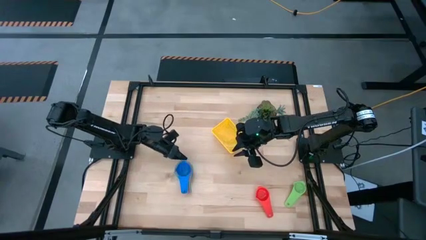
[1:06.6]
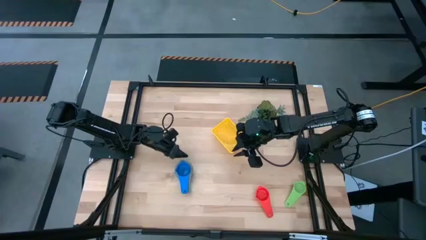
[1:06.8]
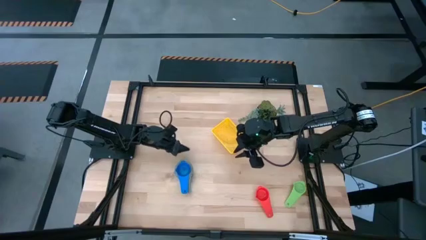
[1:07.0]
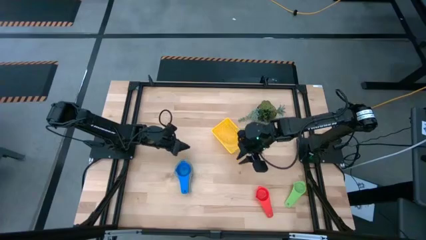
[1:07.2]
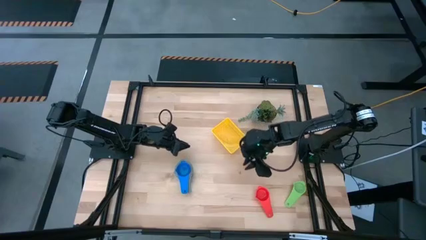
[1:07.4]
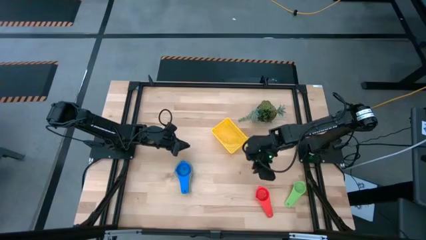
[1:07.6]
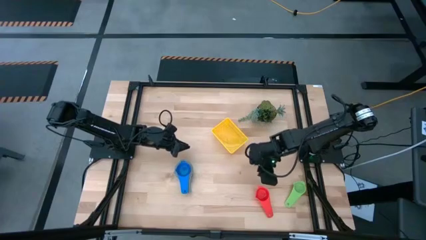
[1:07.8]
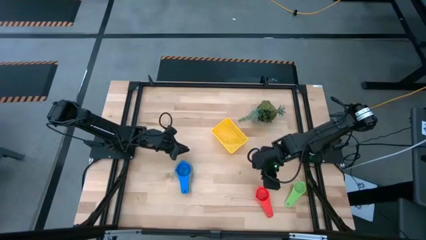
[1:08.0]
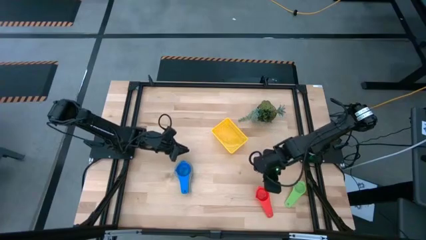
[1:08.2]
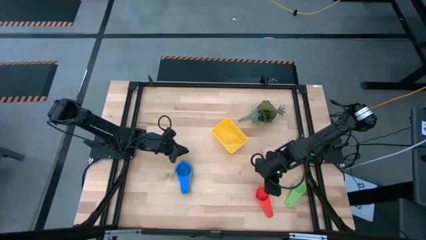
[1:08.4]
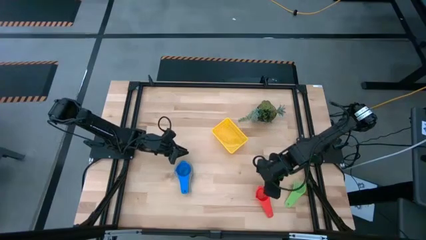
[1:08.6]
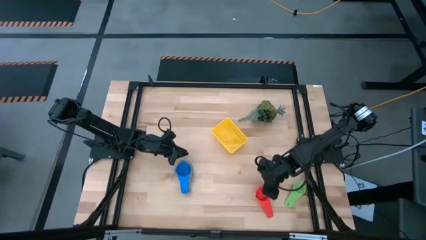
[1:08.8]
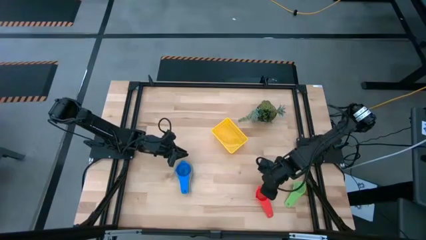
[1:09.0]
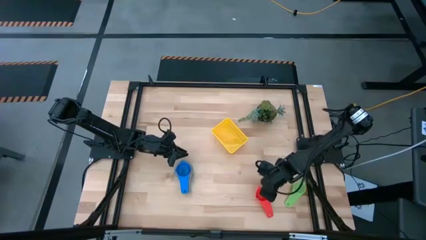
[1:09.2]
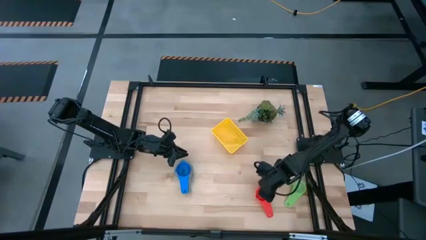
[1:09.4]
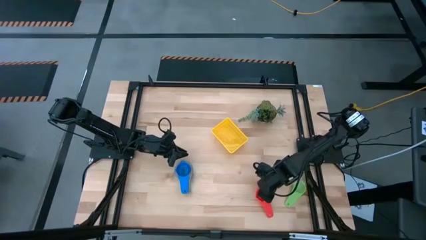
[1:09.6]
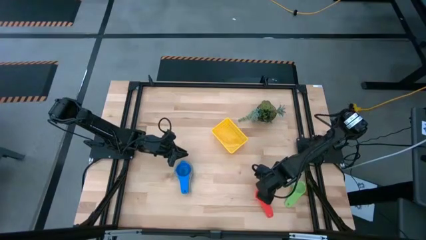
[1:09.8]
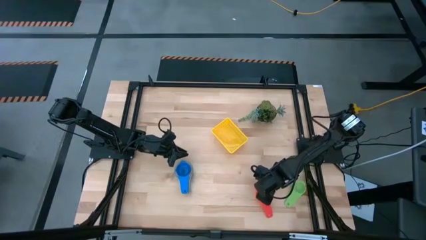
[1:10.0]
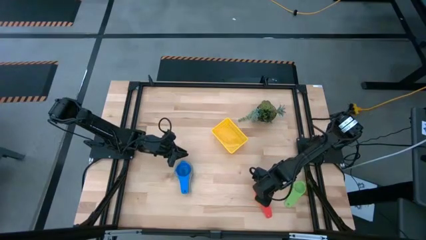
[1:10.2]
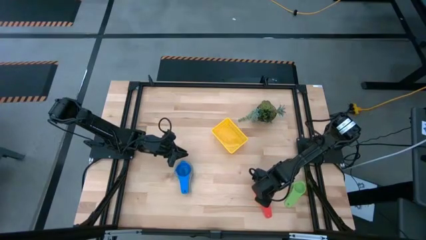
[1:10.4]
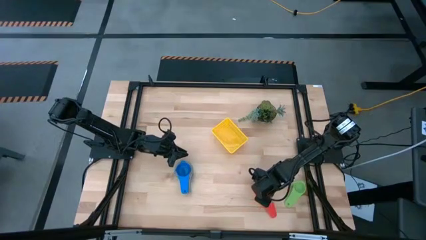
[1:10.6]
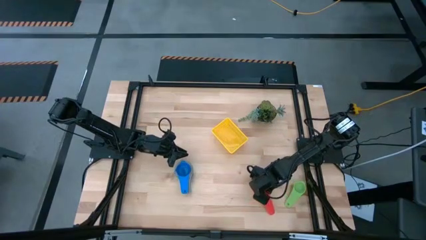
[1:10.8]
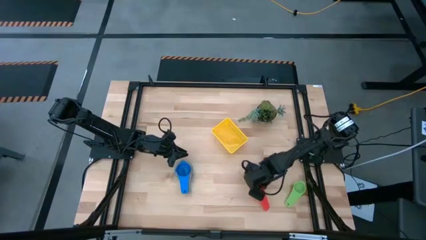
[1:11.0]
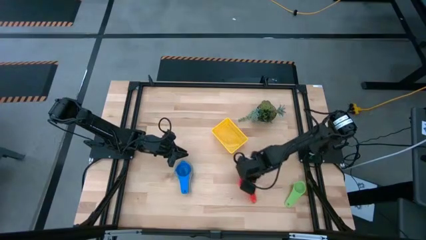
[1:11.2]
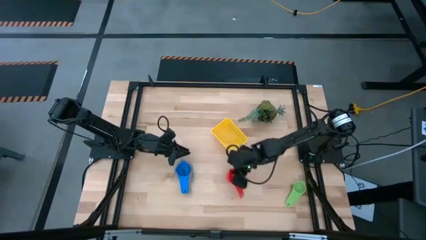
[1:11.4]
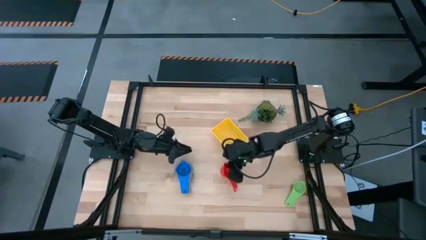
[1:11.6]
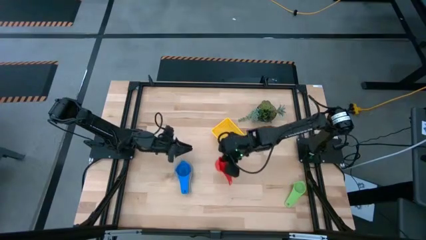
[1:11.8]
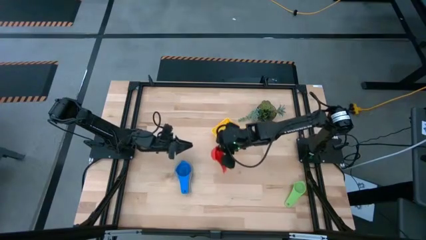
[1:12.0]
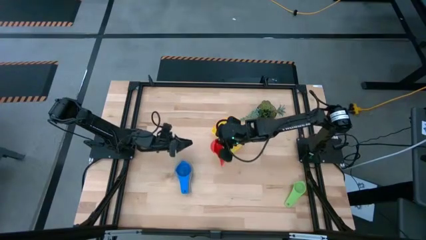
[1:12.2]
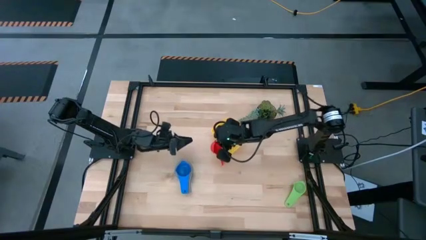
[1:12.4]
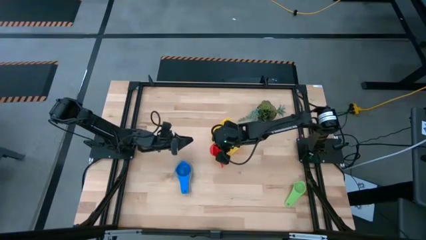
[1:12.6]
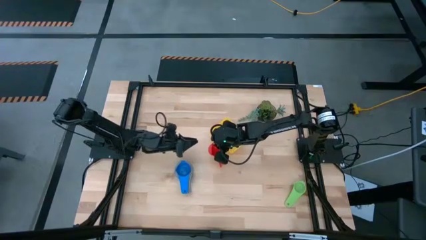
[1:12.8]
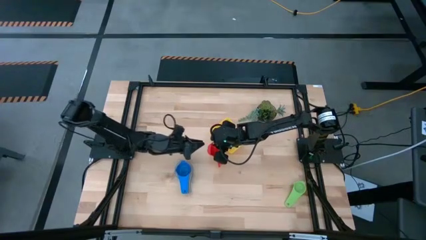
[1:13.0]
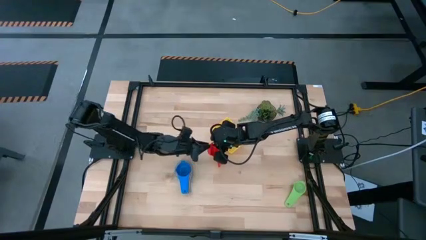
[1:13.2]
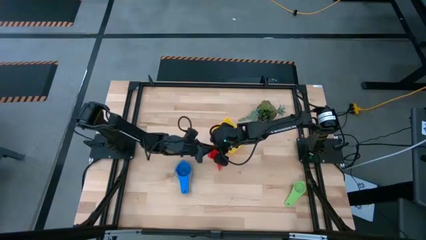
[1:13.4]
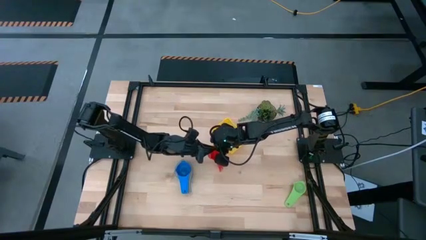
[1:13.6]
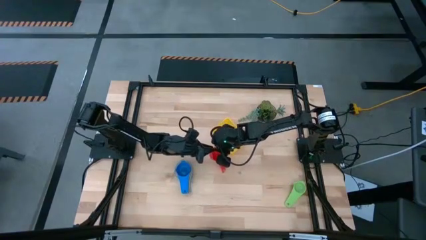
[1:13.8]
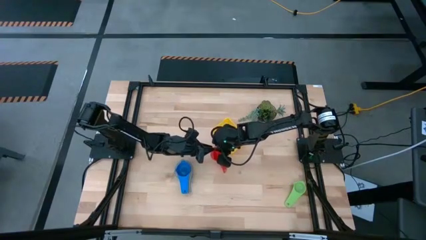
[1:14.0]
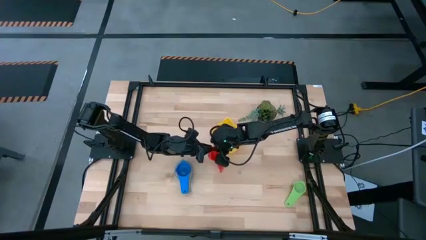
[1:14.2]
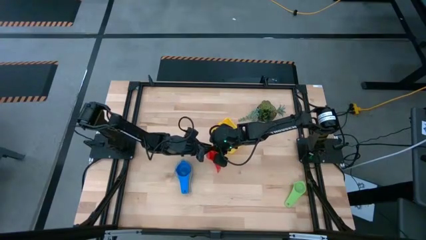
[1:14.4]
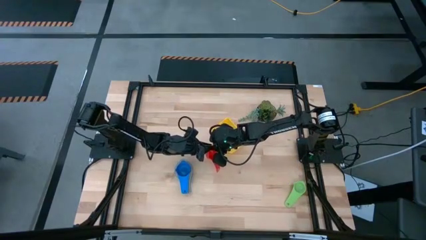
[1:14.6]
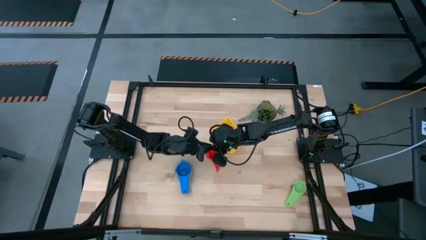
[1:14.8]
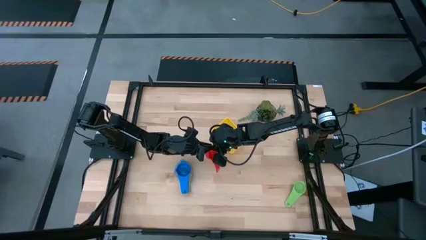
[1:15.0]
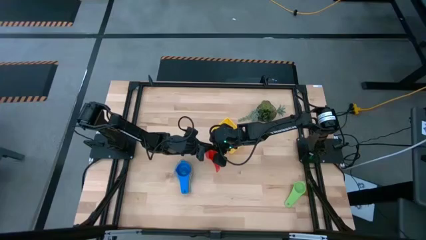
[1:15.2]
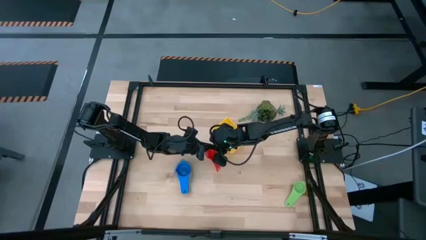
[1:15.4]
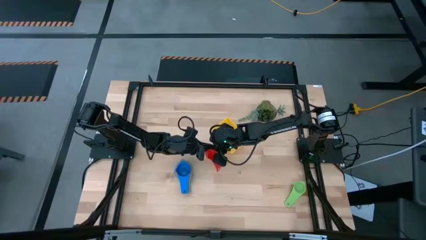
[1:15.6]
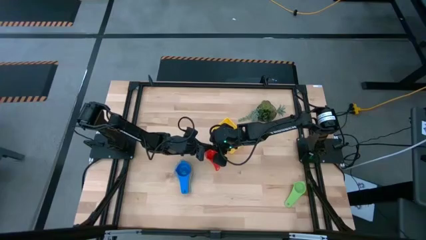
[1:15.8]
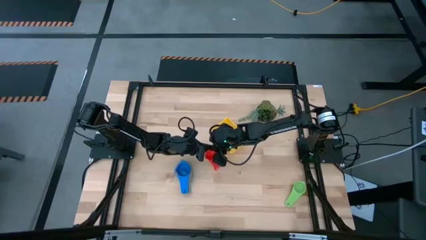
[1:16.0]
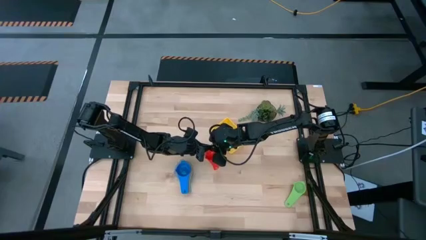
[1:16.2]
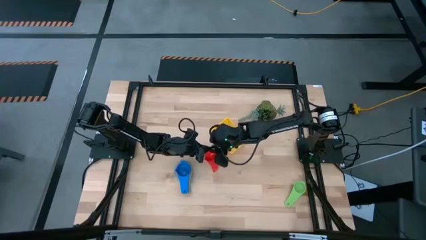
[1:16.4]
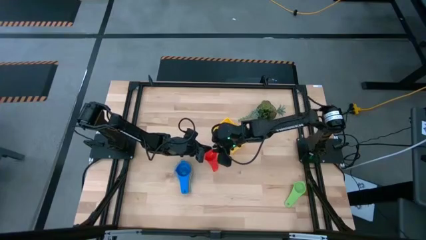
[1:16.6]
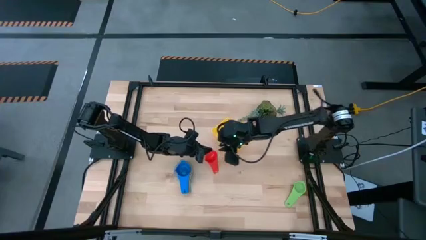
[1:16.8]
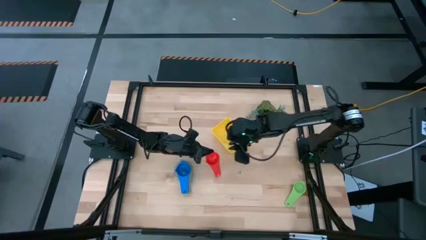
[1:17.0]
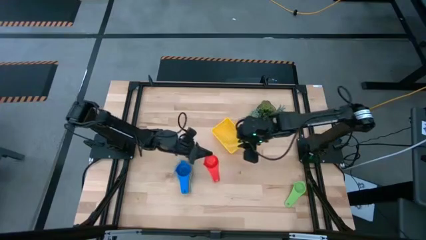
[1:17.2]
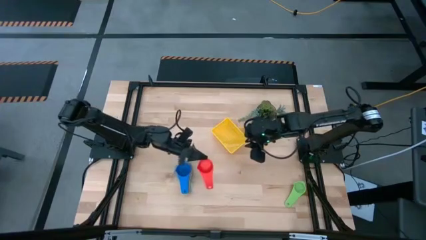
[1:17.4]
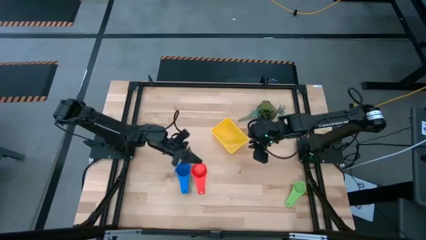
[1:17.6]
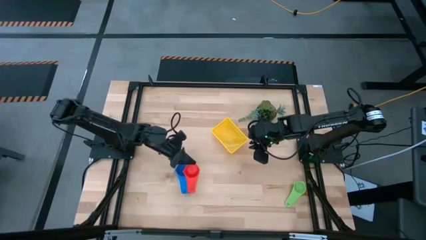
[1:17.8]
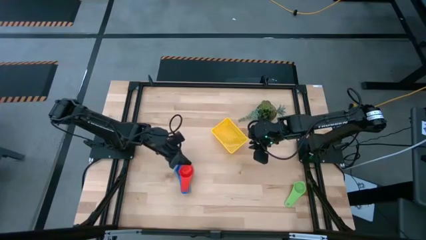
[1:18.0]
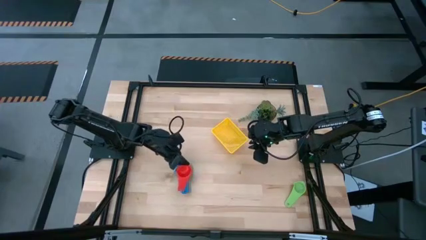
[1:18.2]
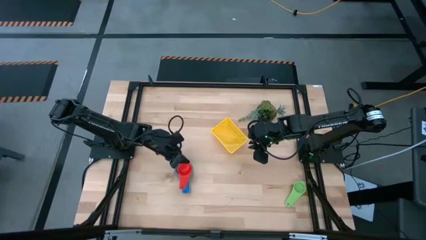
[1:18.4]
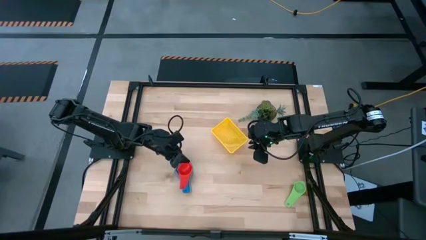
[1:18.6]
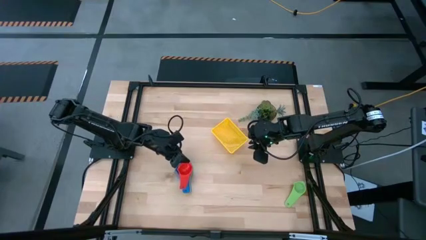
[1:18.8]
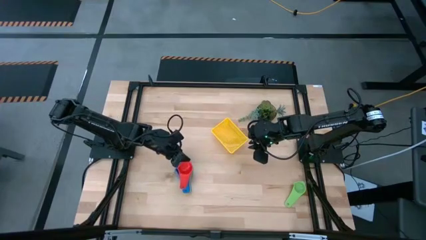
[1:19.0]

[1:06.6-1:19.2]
Task: Nest measuring cups in basket
Stack the red measuring cup on top of the blue measuring cup

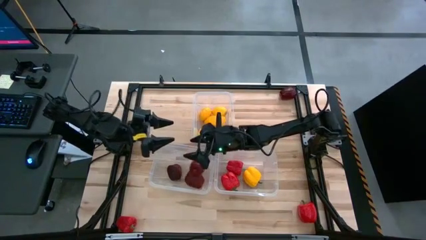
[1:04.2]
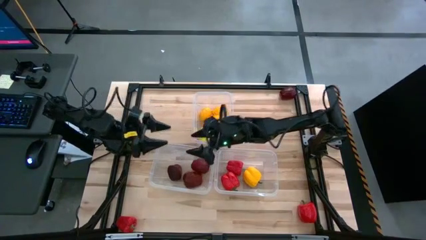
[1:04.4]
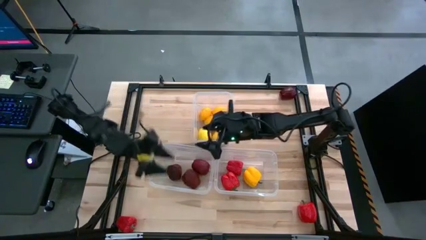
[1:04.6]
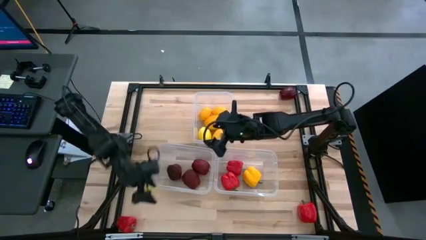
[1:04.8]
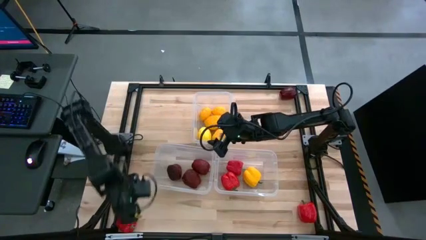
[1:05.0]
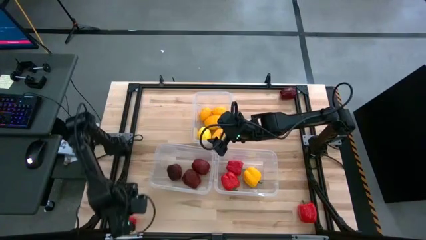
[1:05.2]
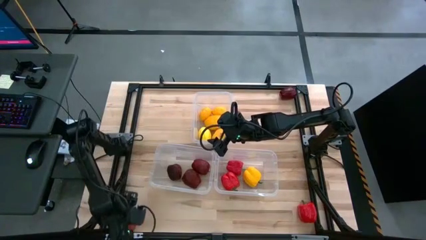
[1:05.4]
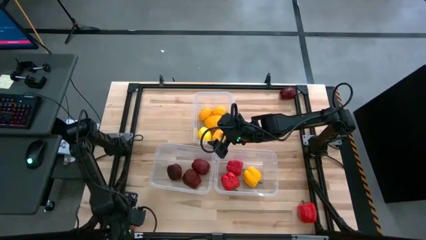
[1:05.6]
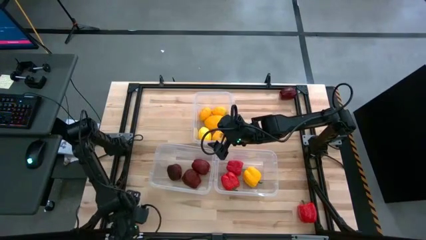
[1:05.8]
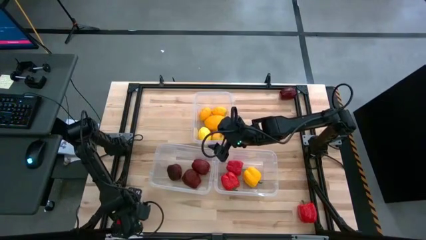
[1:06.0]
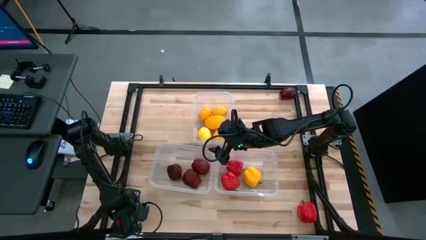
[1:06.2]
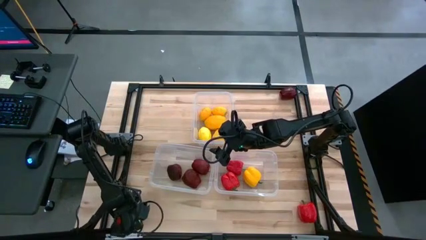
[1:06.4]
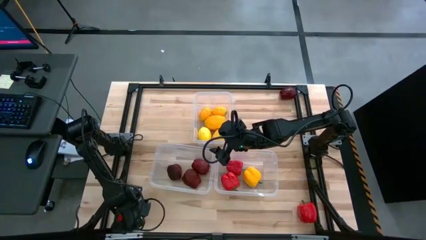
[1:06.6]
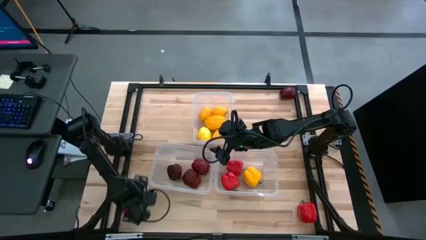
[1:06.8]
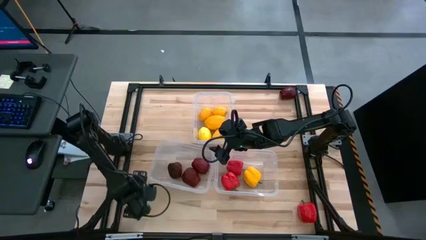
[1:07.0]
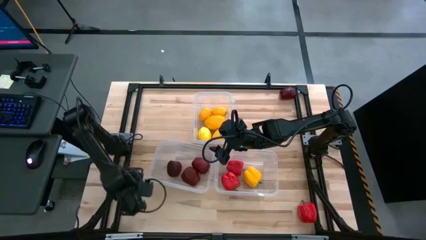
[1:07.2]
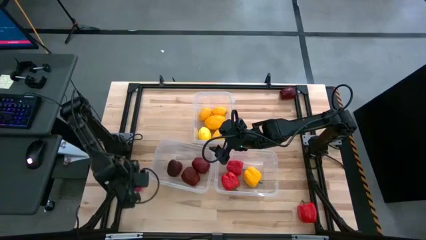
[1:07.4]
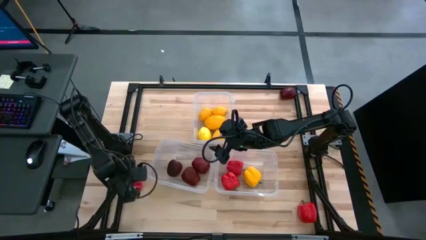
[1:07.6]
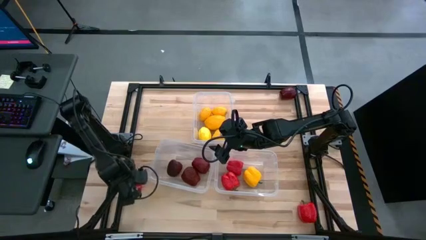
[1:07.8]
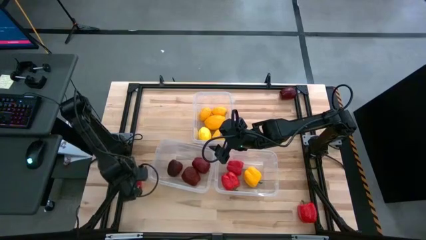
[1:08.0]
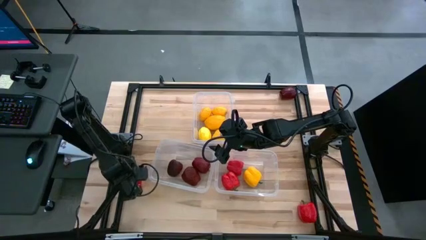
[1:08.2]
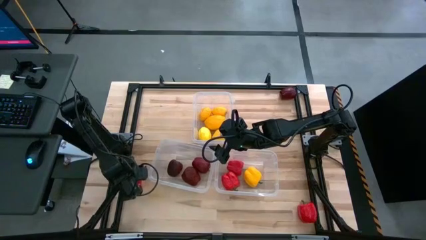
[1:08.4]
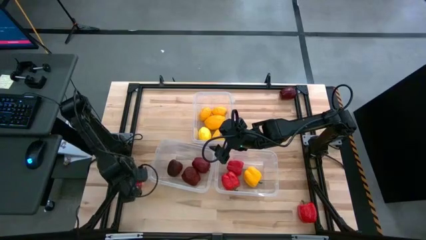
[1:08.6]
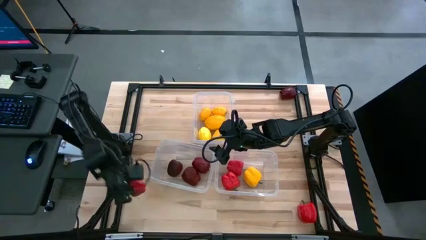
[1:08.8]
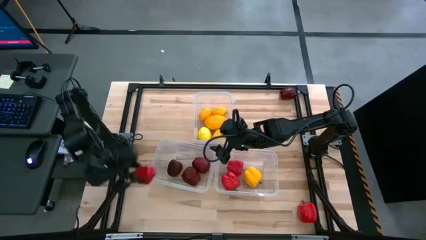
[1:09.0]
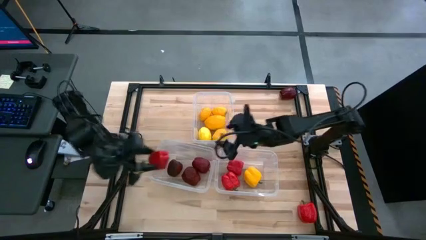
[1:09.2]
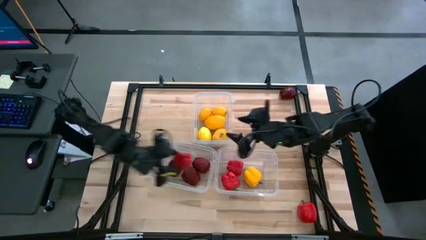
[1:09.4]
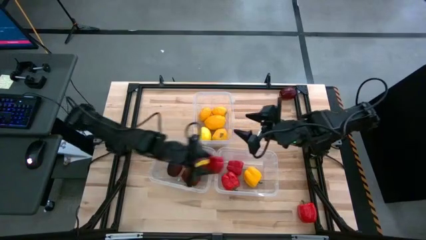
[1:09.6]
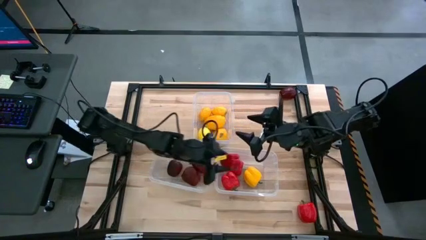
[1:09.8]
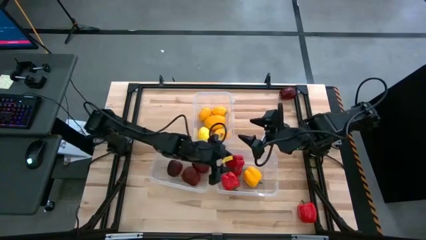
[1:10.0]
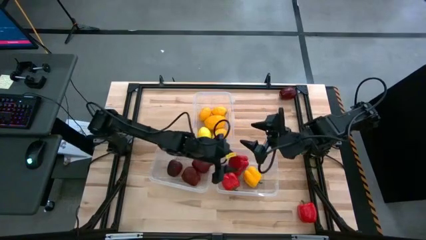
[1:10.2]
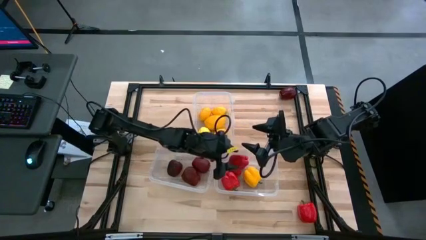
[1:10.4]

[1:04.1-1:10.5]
Task: Sort produce into baskets
Put the red bell pepper into the bottom right transparent bin
